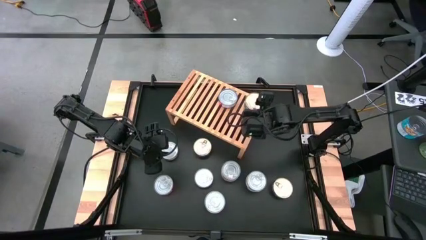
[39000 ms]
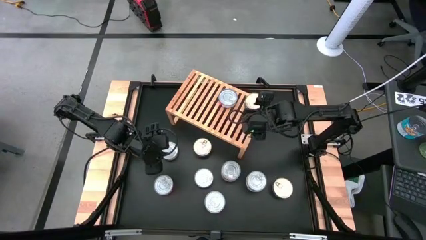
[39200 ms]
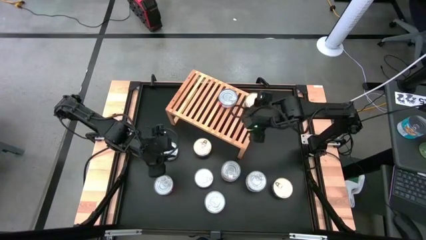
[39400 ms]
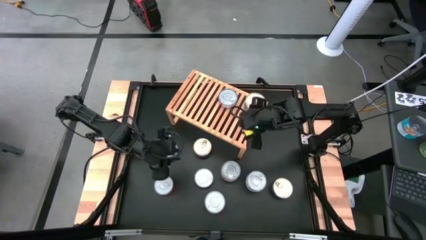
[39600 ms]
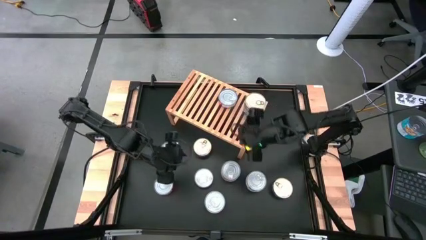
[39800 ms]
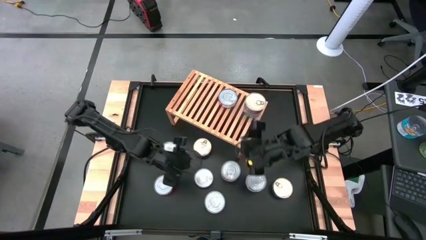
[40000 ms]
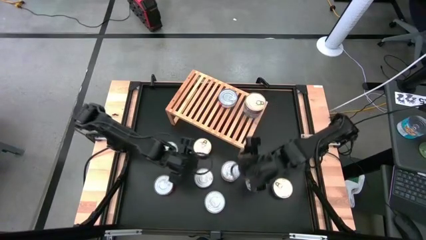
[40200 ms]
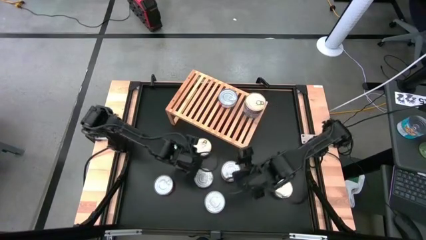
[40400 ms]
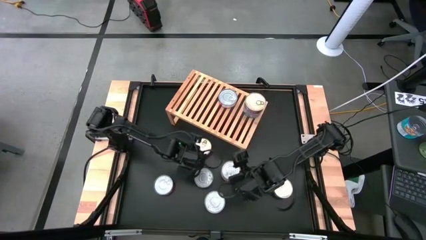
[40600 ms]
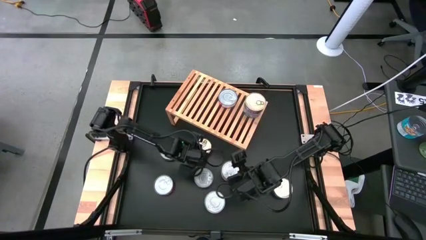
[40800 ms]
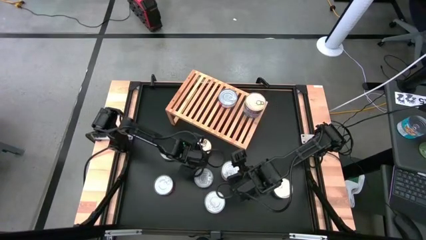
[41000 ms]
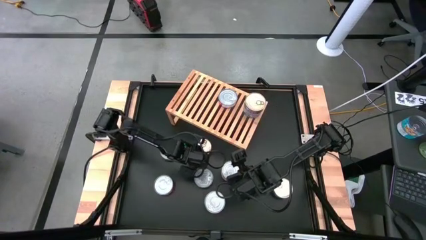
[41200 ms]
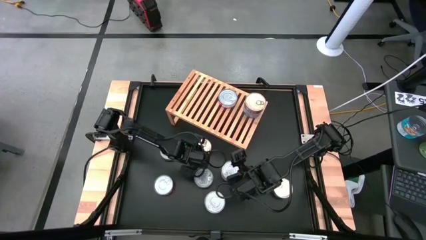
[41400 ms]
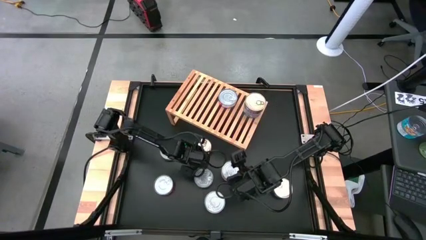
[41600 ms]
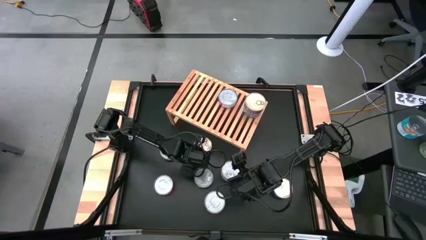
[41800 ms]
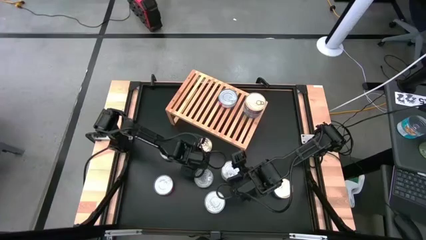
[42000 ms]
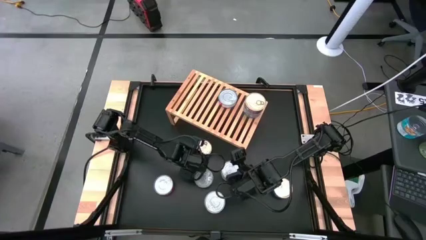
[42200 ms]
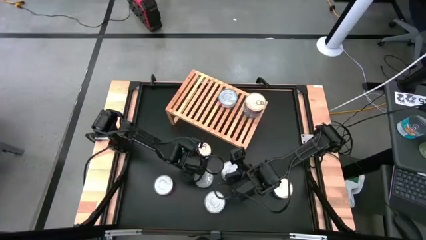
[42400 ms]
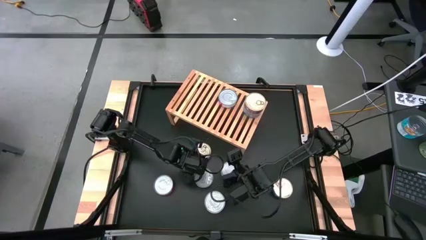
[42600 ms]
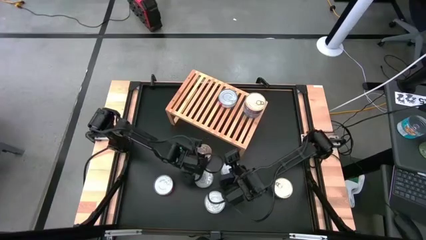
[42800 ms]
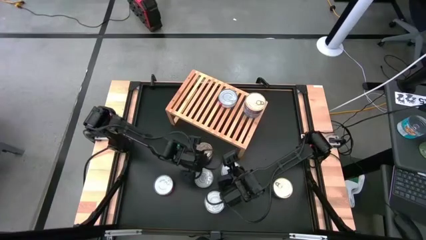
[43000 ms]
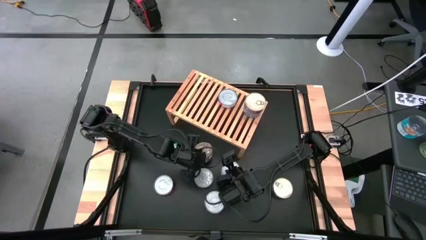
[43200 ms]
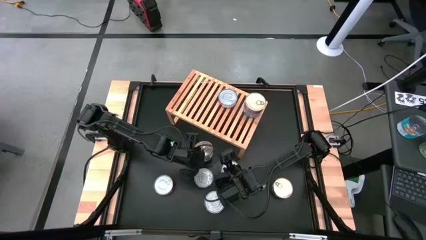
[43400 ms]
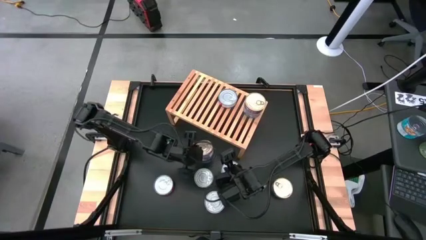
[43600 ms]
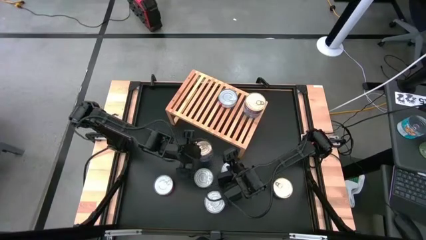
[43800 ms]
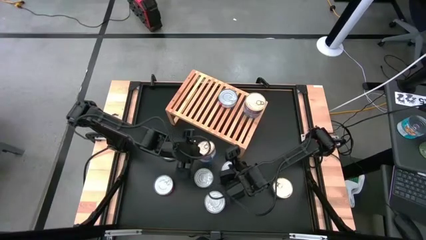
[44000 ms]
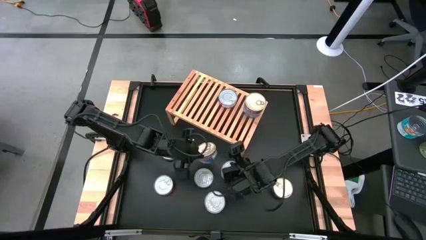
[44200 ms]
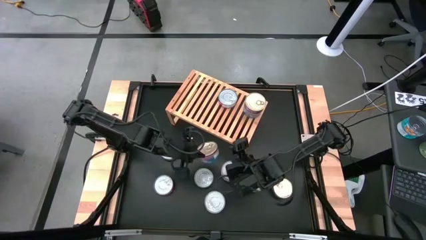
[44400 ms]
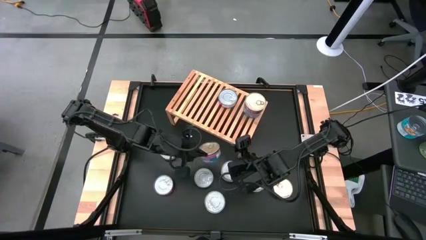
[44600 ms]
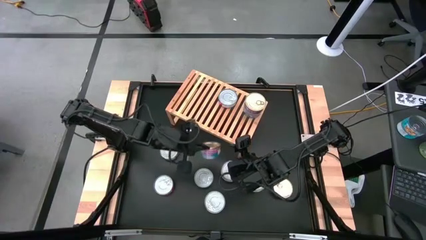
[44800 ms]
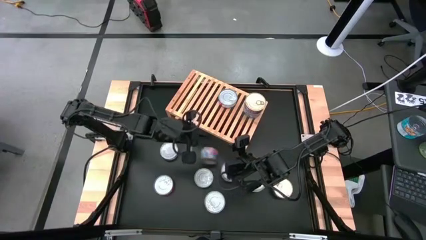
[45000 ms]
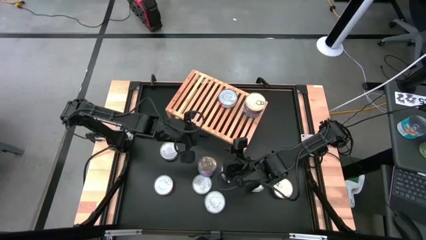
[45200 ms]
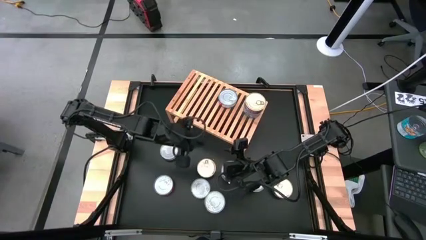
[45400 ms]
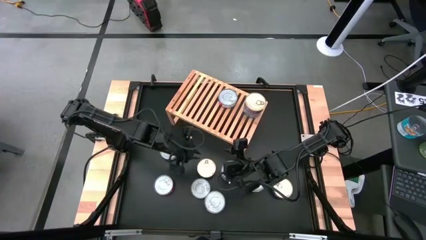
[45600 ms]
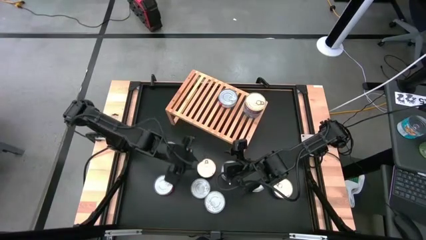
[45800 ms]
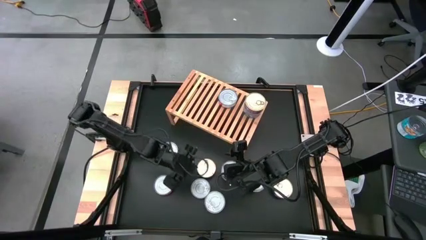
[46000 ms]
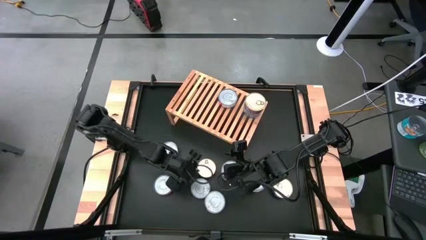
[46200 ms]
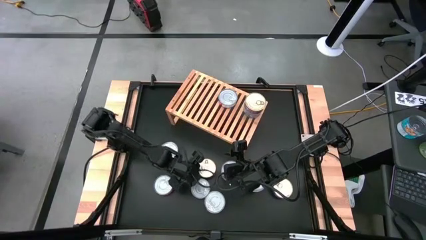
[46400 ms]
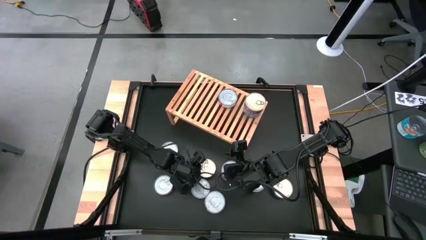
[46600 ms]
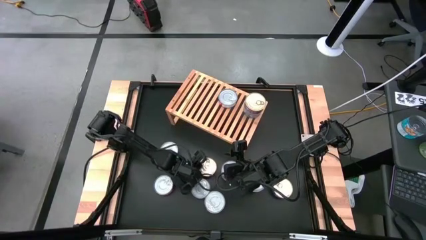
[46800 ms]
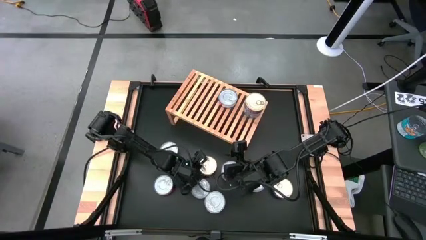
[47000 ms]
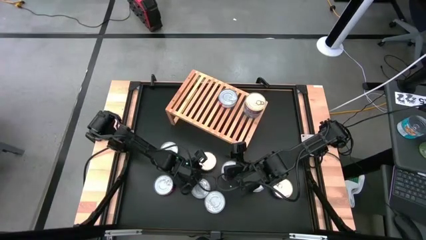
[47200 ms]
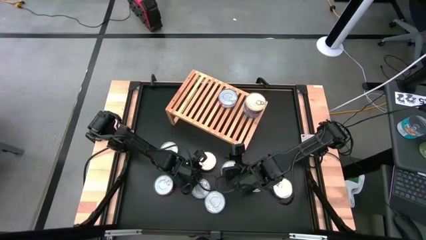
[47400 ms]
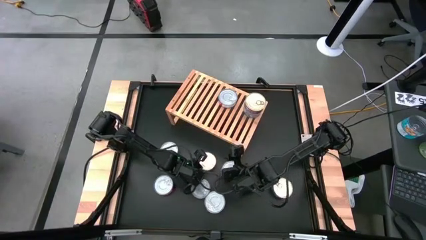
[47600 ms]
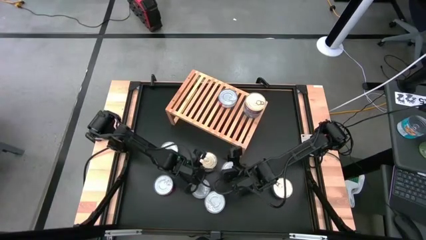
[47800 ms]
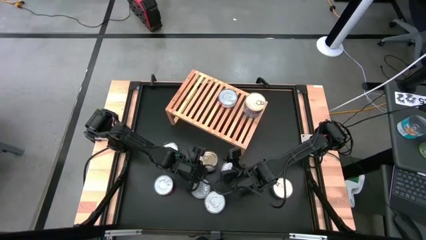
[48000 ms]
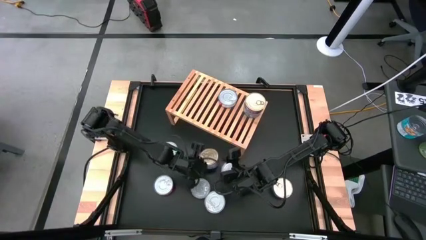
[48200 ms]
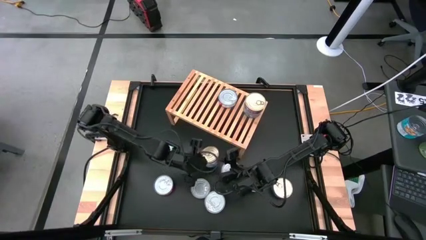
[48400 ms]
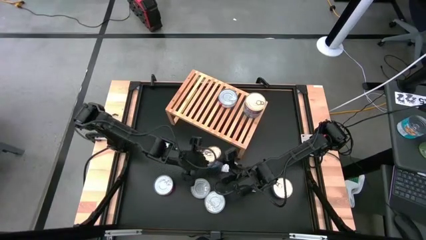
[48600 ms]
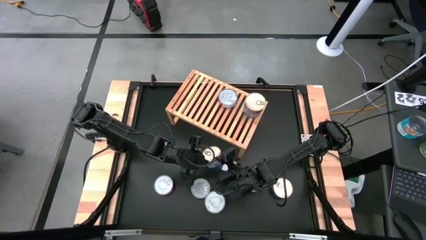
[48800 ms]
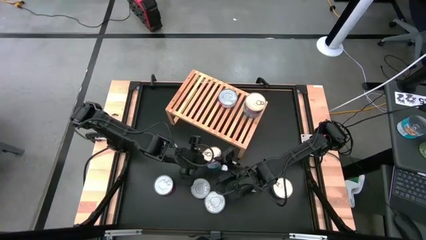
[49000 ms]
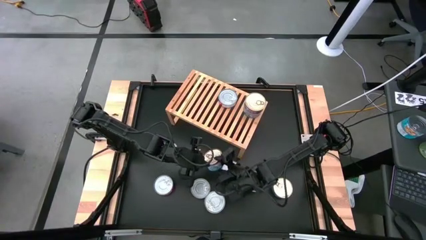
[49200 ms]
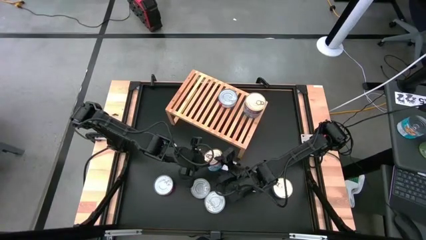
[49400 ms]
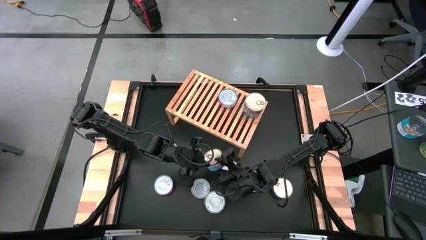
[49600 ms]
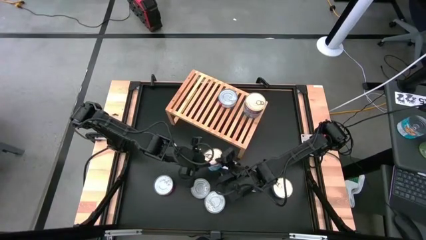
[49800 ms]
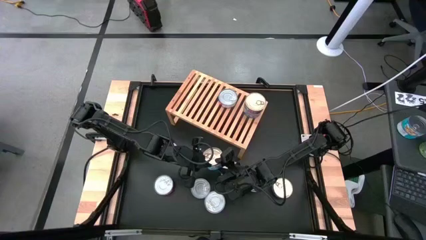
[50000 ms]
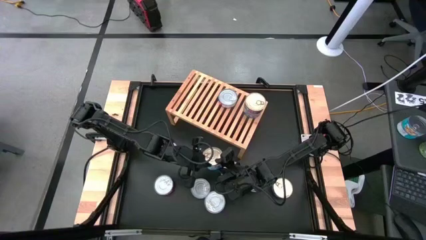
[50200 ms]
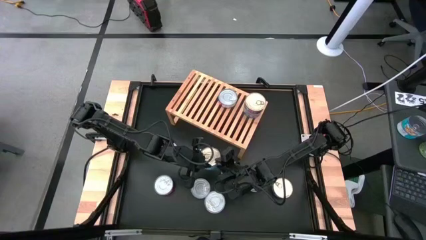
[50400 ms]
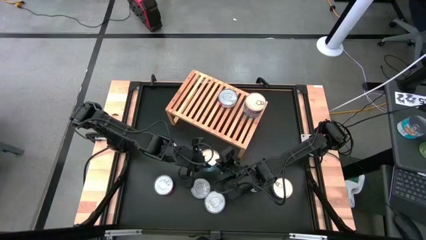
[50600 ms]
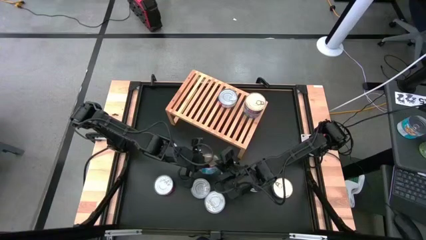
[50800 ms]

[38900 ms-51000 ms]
Task: Stack canned seafood by type on shelf
Put the blue and pink tuna can can on the shelf

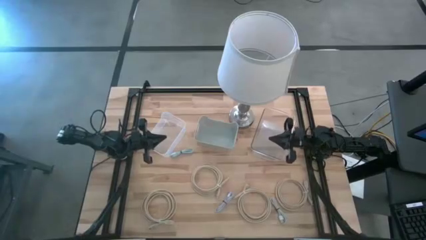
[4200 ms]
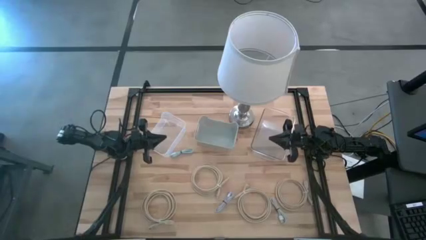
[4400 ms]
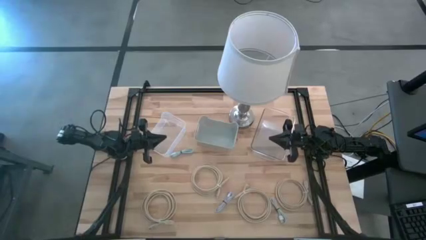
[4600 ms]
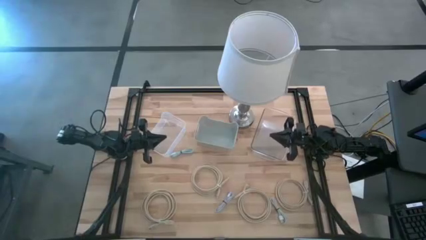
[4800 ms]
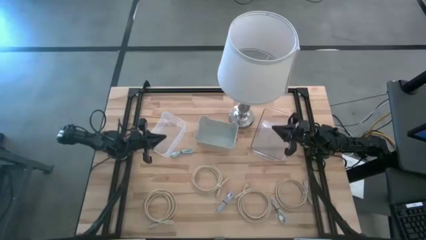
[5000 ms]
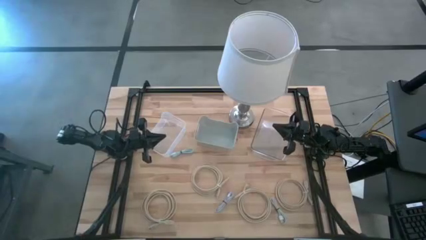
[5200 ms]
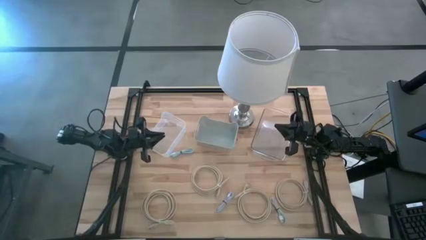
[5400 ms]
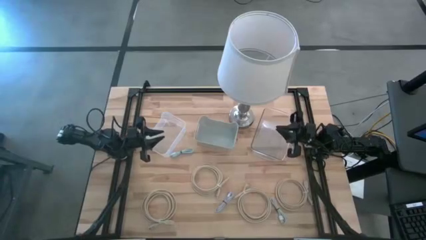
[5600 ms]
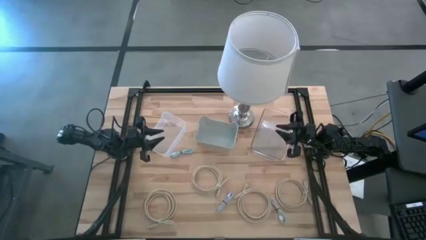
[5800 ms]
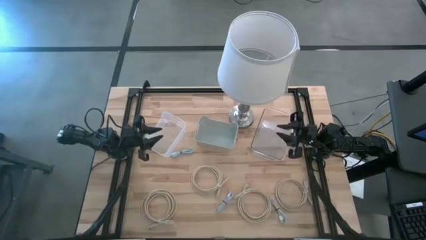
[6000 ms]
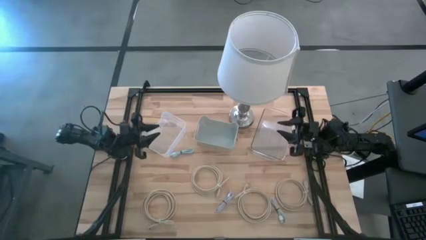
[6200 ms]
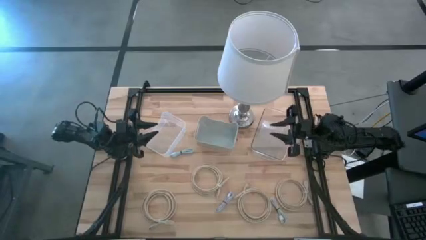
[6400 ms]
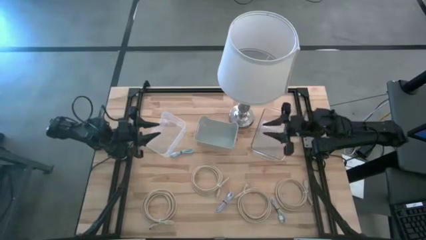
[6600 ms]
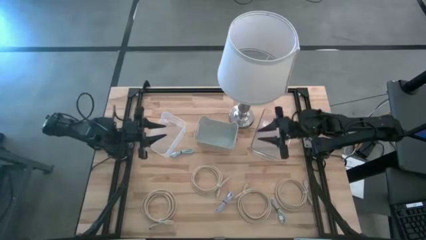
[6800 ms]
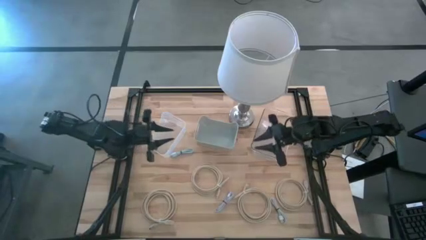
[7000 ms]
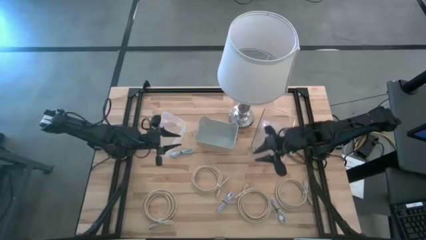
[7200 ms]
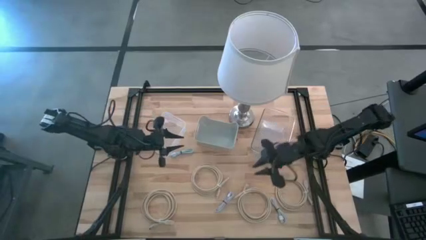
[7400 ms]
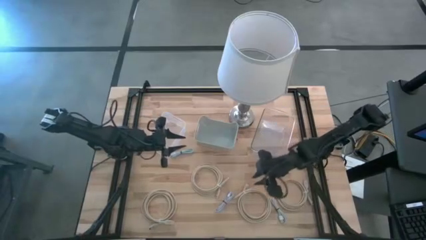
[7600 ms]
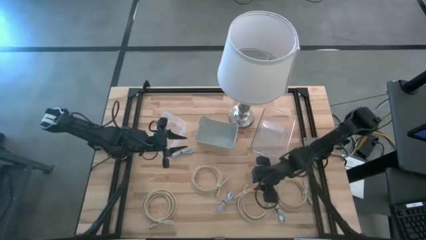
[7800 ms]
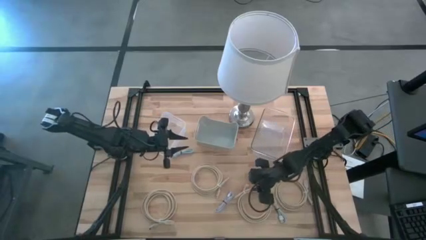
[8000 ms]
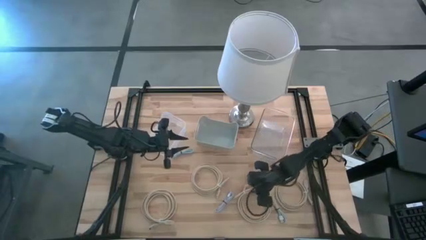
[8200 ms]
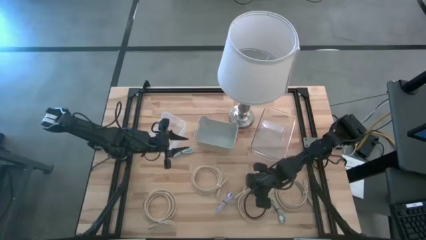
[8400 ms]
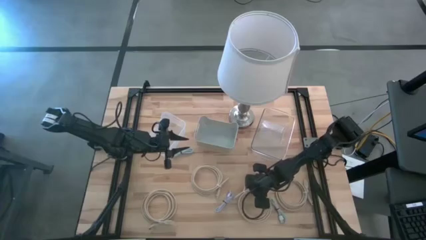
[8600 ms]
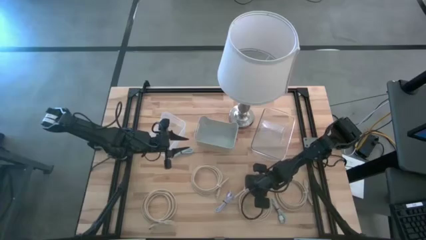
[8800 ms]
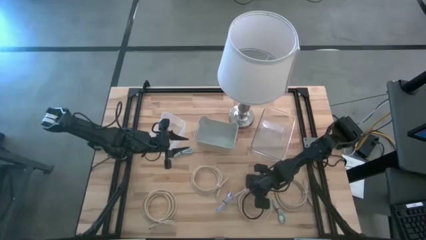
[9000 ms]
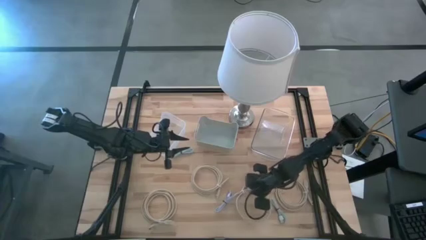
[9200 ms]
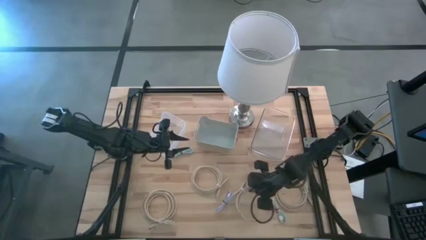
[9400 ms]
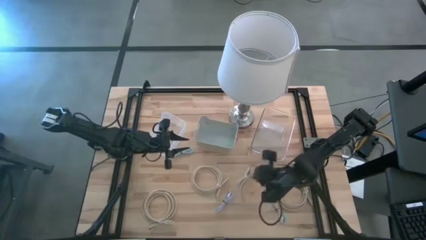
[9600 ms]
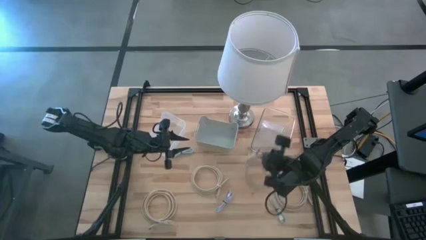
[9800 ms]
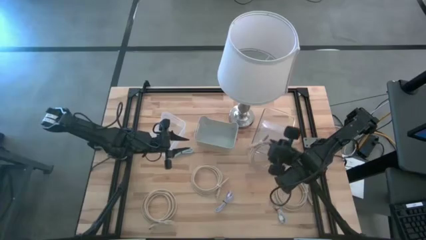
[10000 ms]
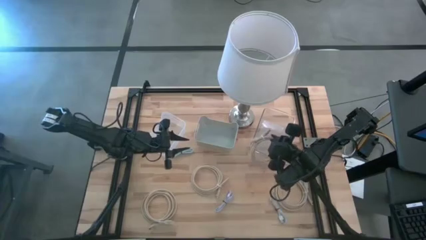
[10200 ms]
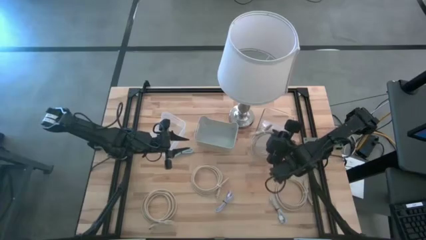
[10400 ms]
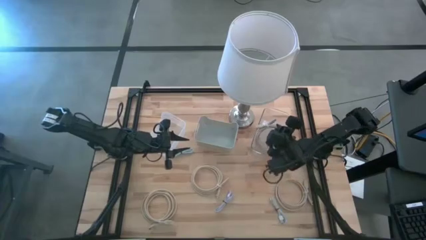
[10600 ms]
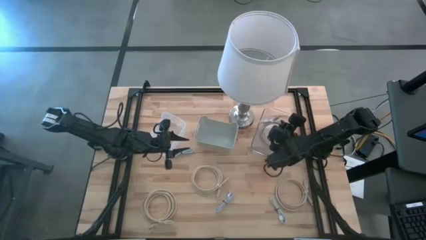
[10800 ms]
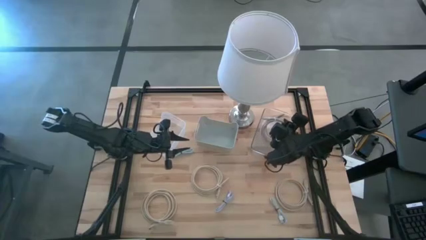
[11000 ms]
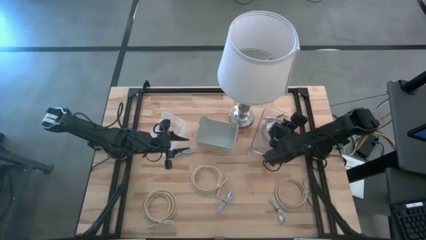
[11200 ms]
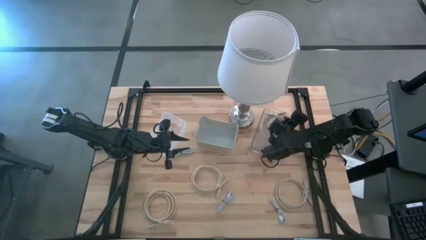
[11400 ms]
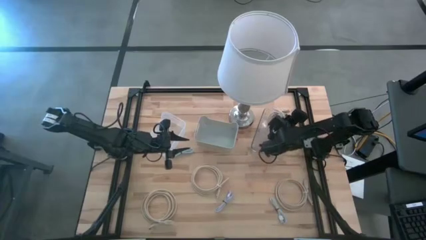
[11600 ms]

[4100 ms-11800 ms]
Task: Pick & Place USB Port
Put the light brown HDMI cable into the transparent bin
